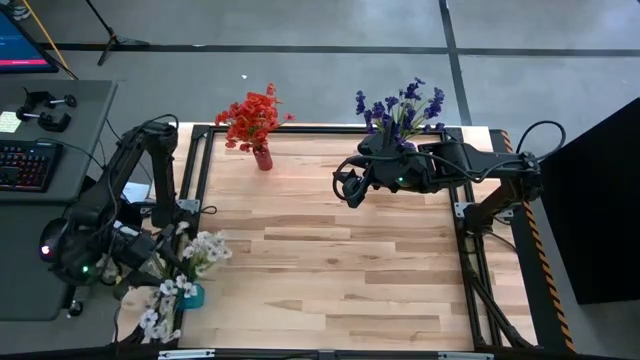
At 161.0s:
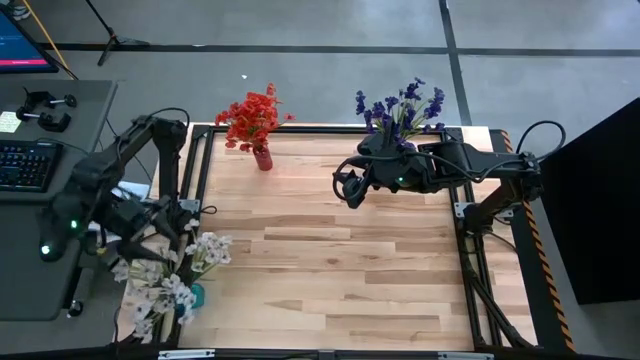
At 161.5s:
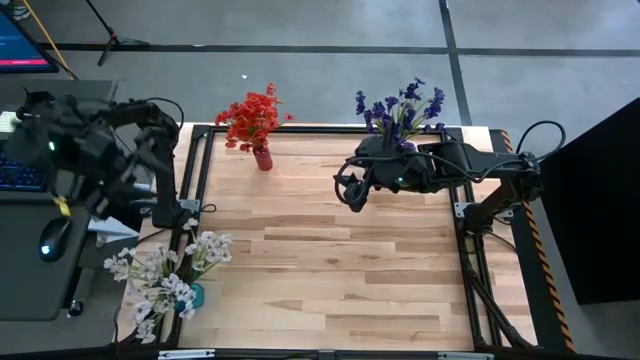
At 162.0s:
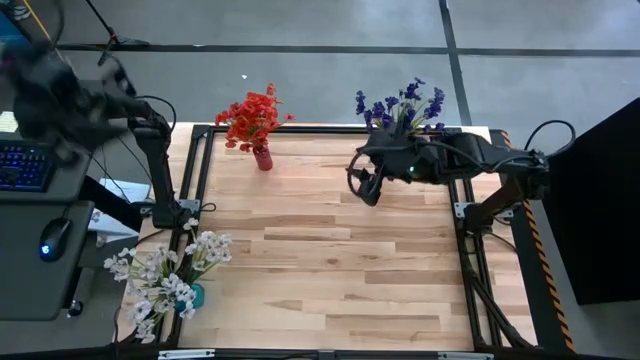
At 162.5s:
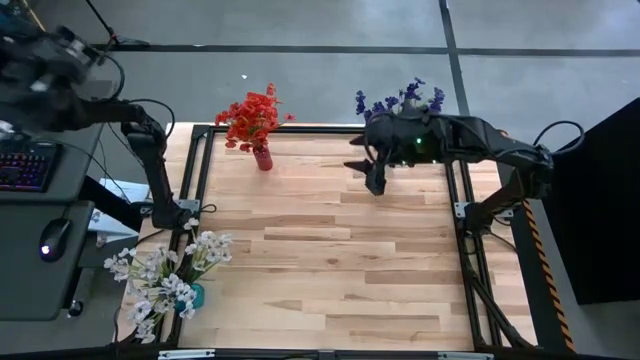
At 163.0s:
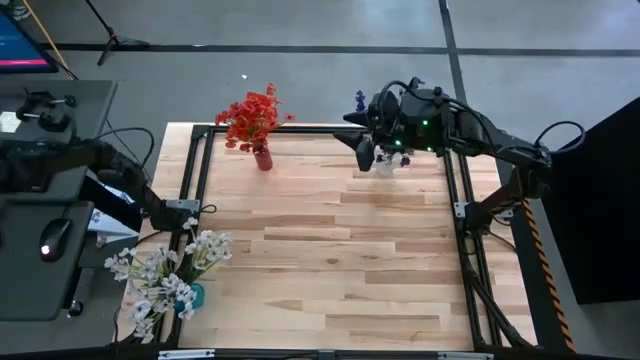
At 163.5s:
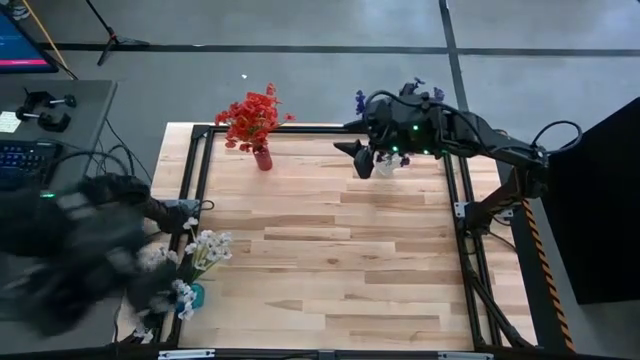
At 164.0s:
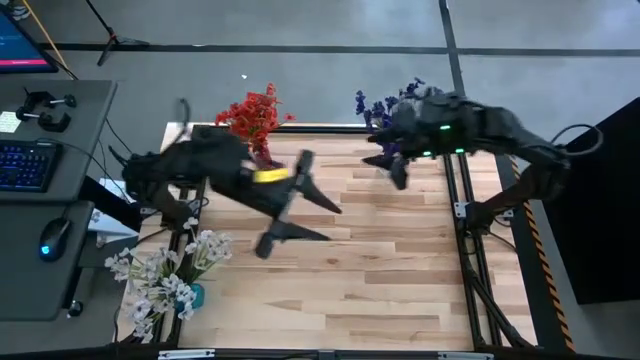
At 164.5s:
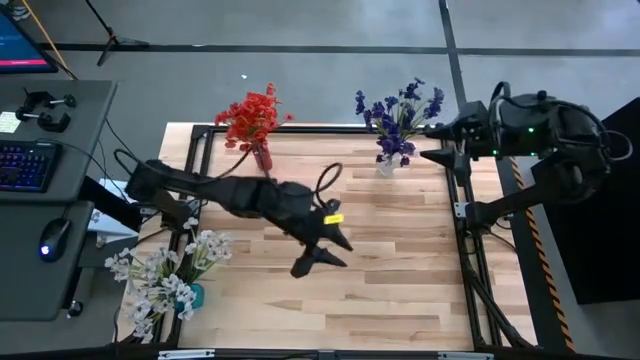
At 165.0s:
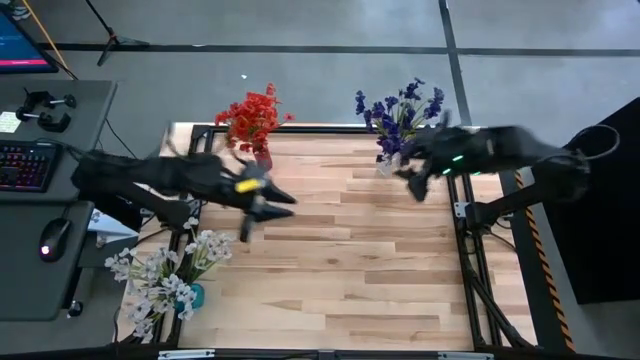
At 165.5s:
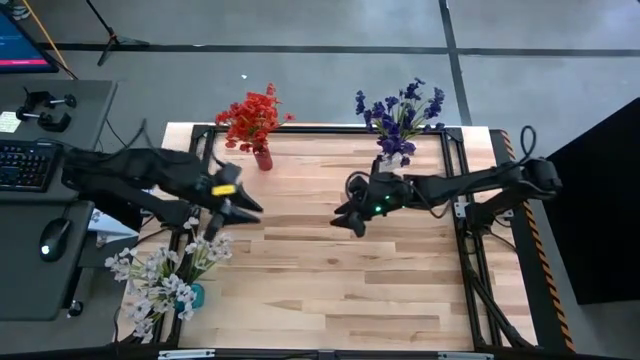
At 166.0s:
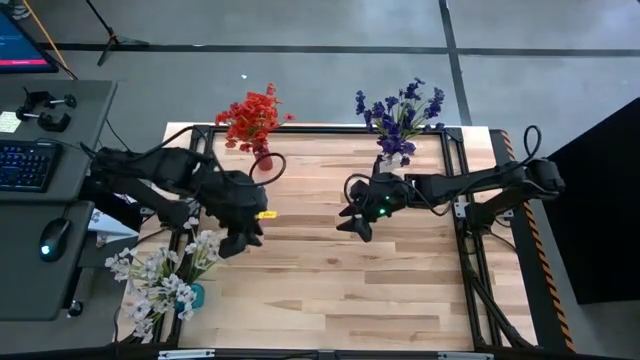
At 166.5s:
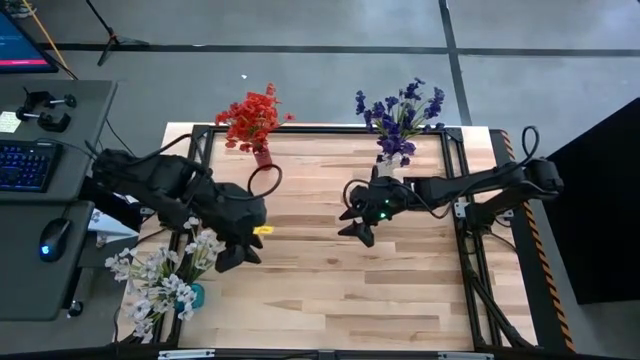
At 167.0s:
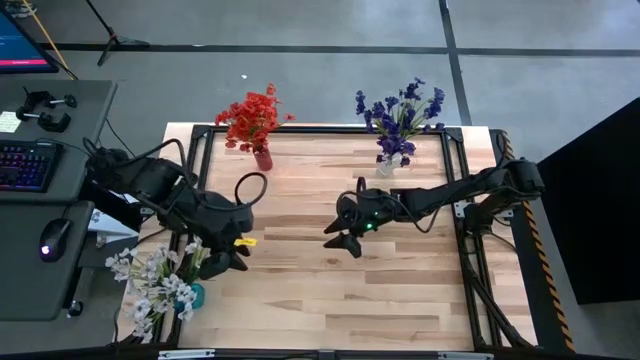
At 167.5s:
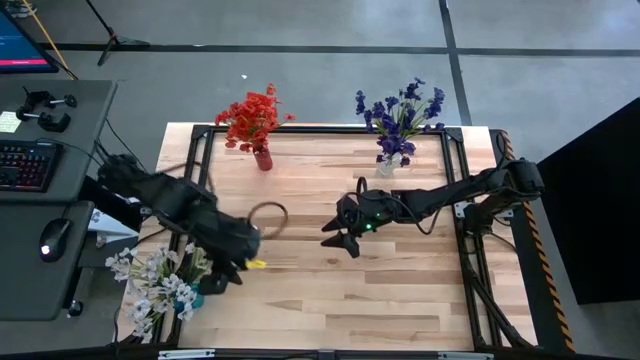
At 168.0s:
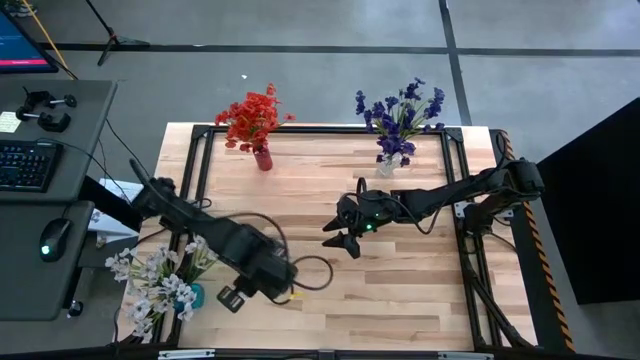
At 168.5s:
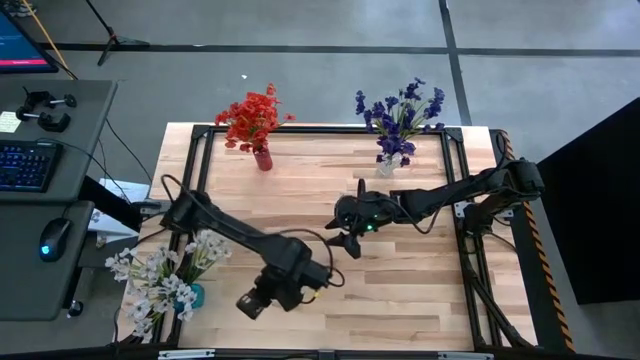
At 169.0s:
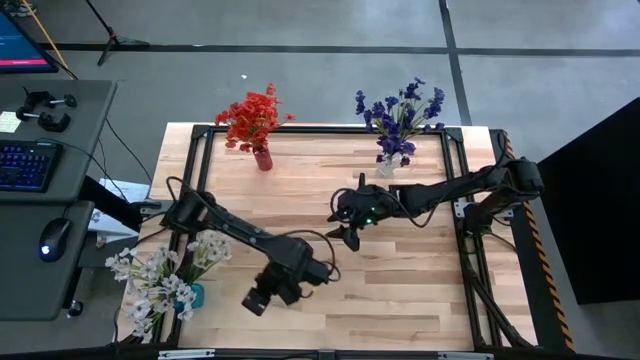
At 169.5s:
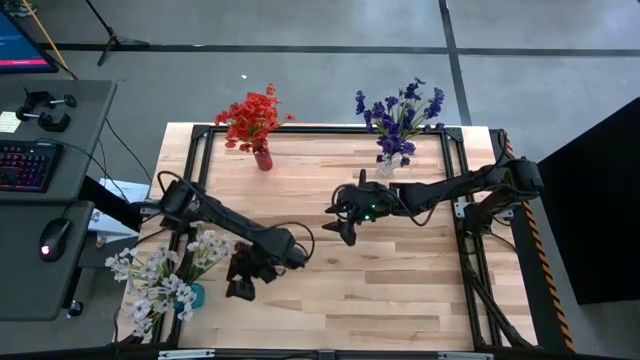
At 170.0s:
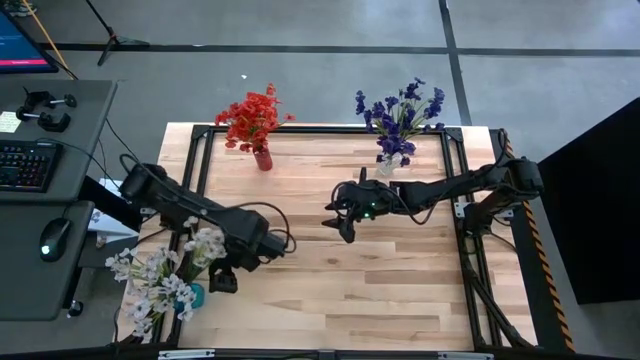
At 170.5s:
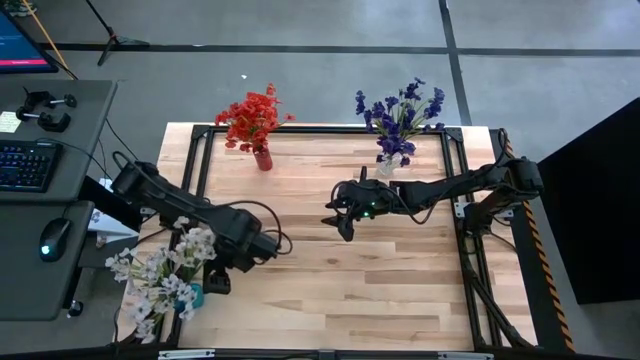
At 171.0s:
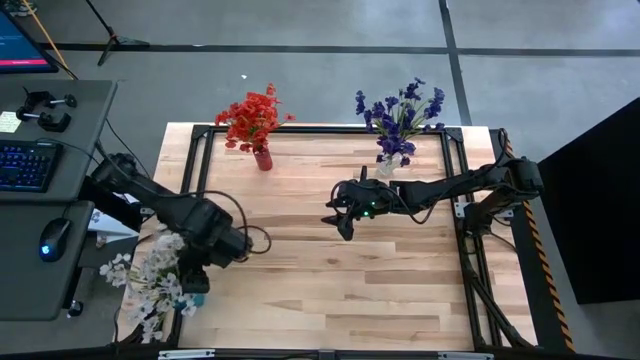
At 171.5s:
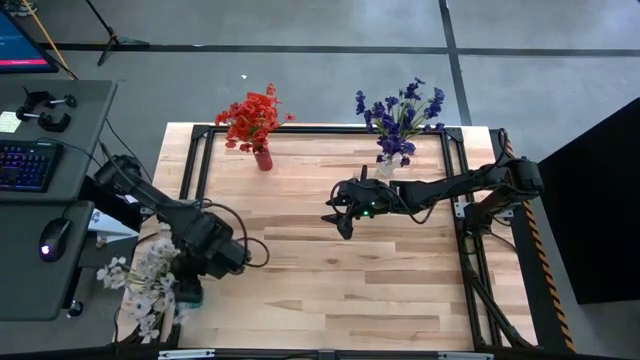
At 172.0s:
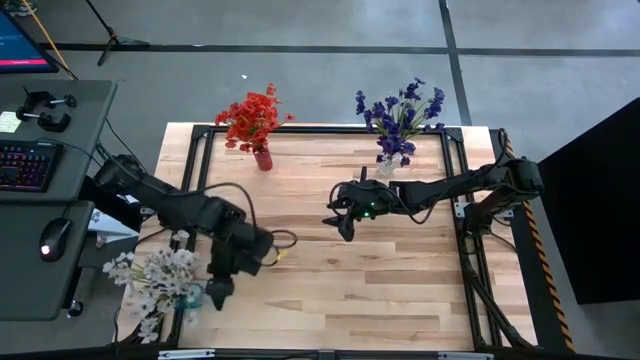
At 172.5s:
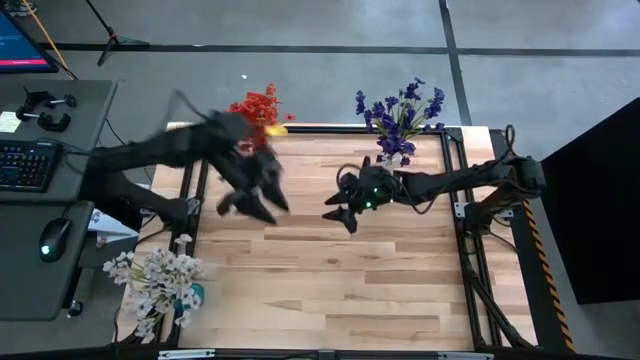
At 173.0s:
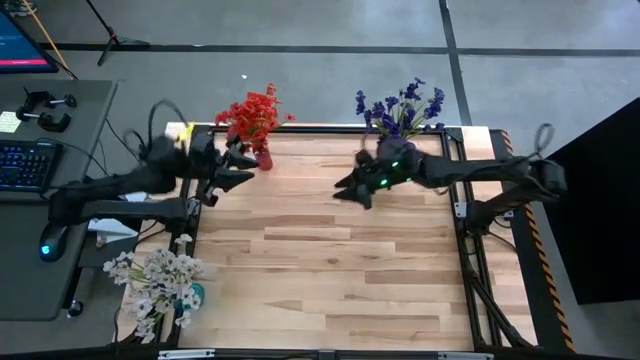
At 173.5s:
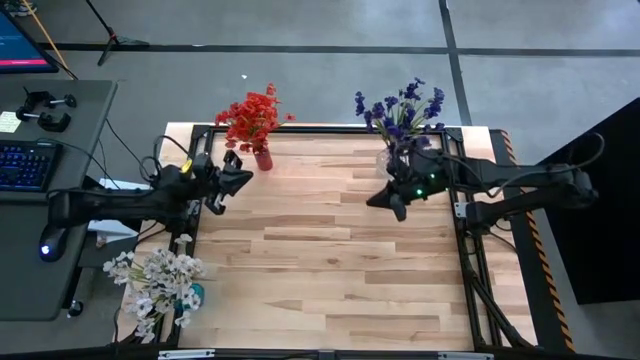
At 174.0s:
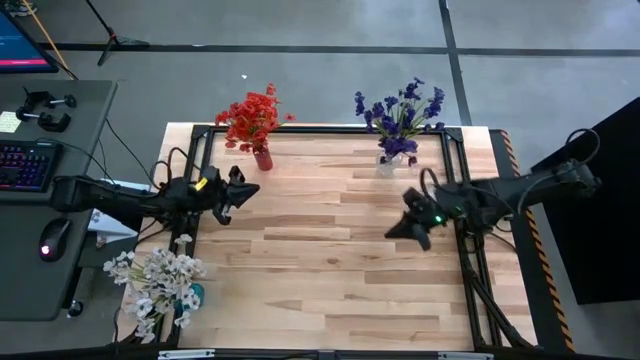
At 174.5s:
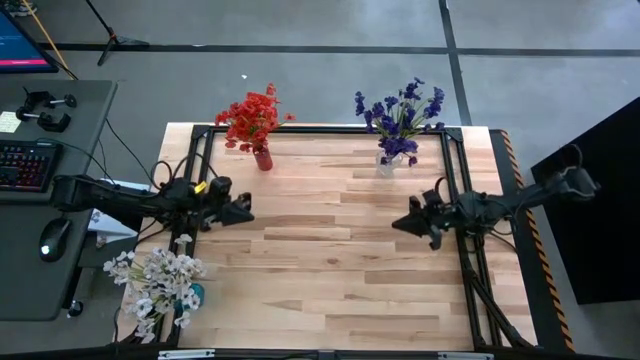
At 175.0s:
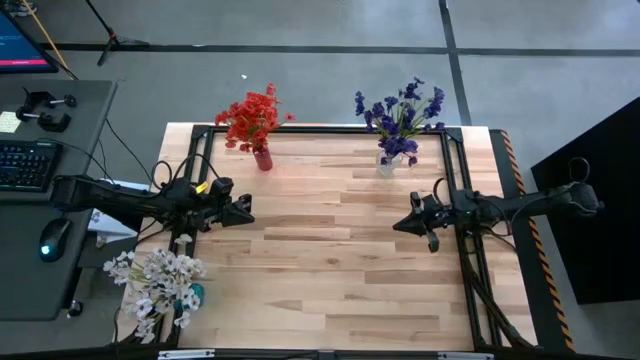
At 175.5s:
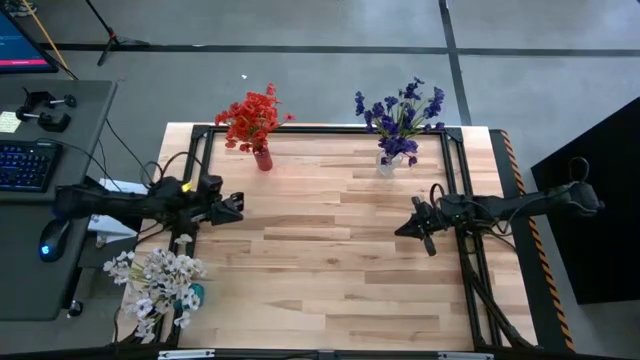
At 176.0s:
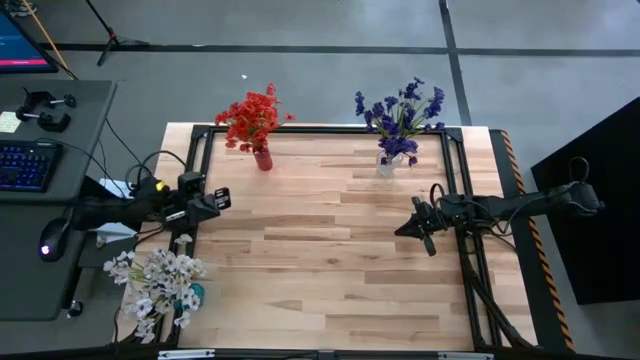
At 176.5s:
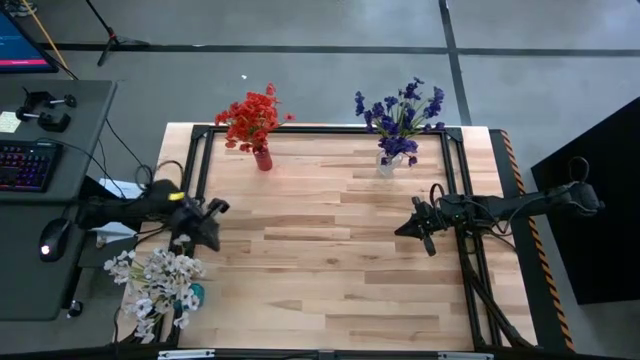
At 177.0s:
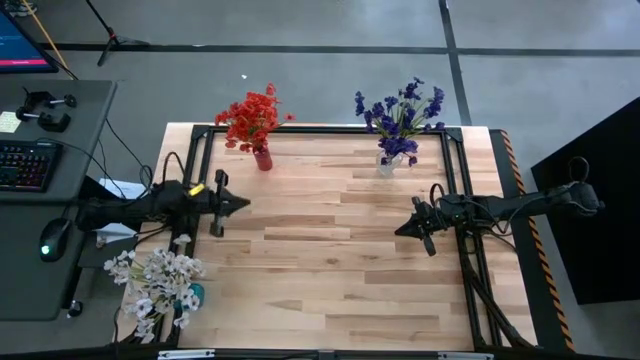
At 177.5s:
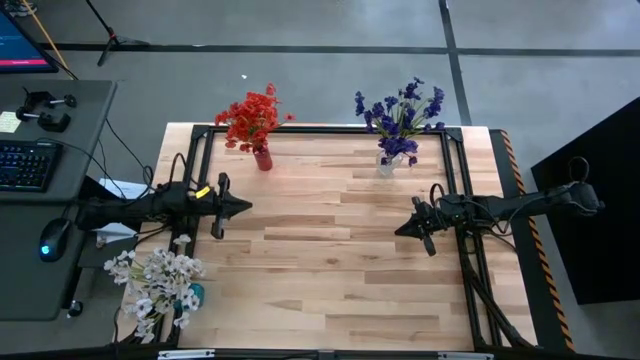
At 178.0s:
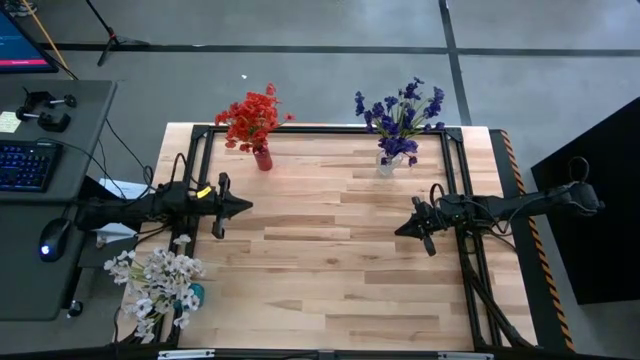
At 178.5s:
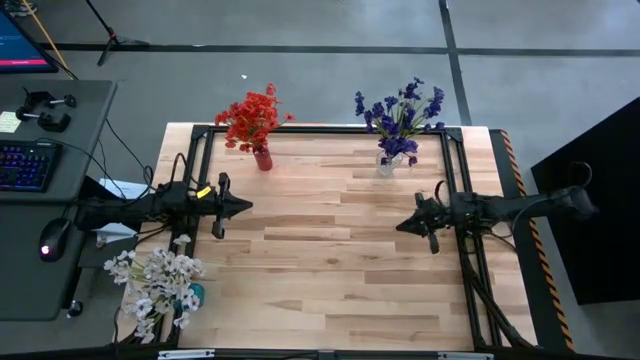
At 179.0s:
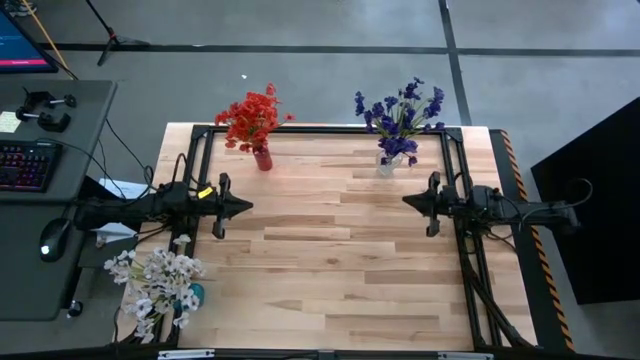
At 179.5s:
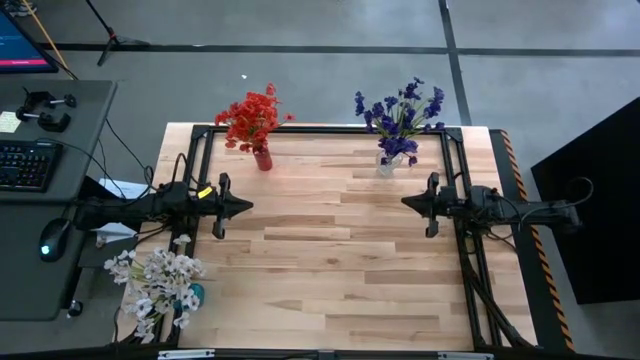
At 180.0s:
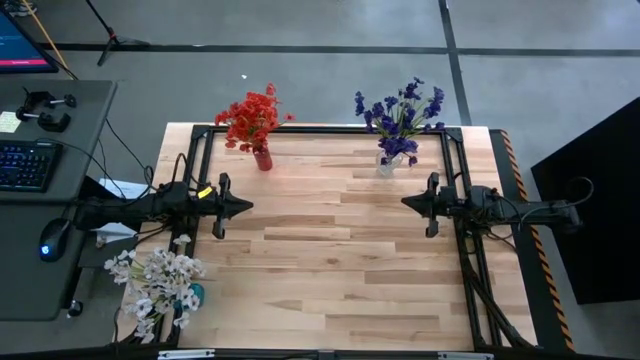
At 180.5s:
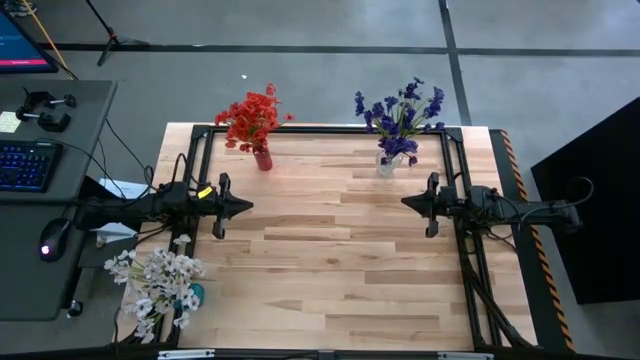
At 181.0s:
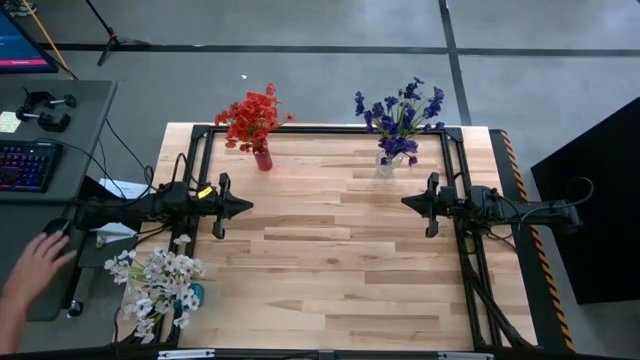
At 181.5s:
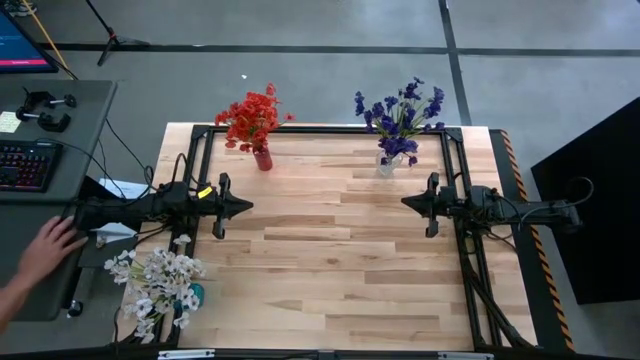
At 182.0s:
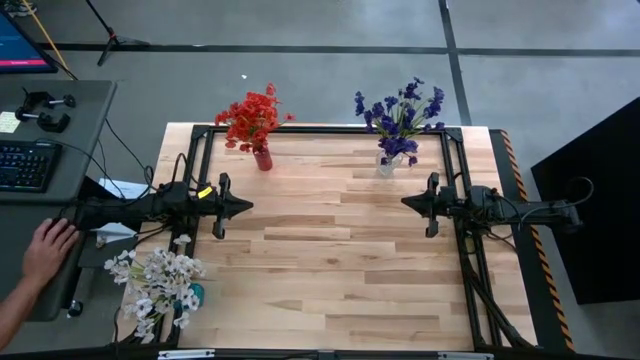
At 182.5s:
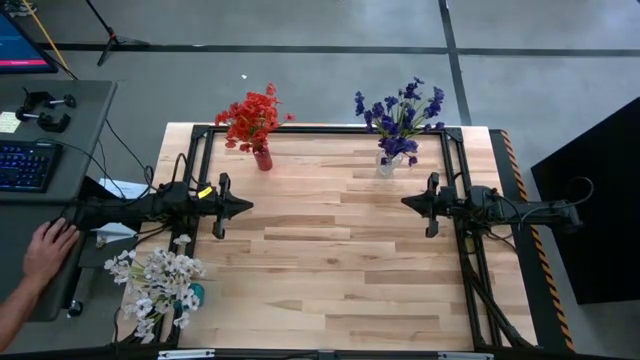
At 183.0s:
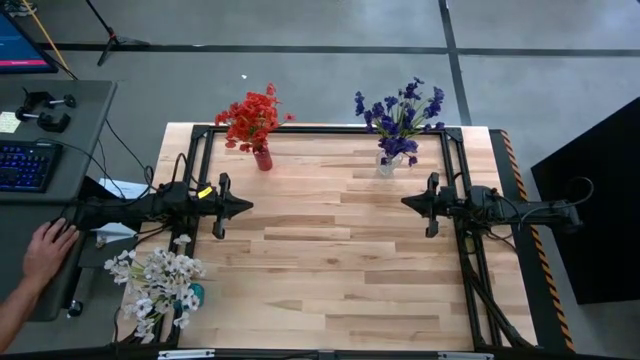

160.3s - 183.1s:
Task: Sort flowers into vase by color
Return to Home Position
